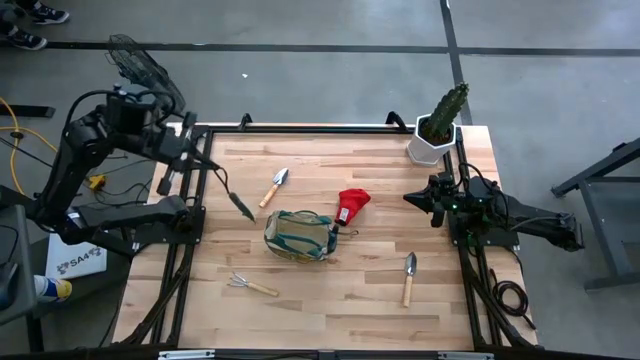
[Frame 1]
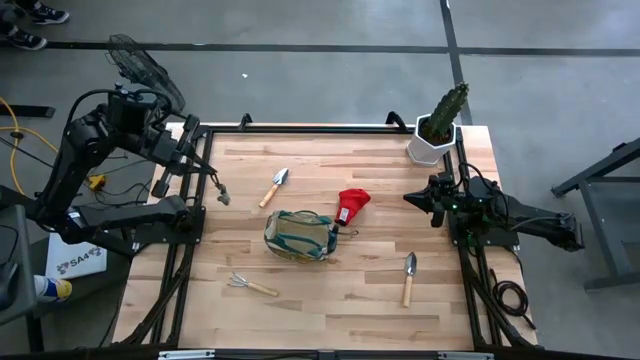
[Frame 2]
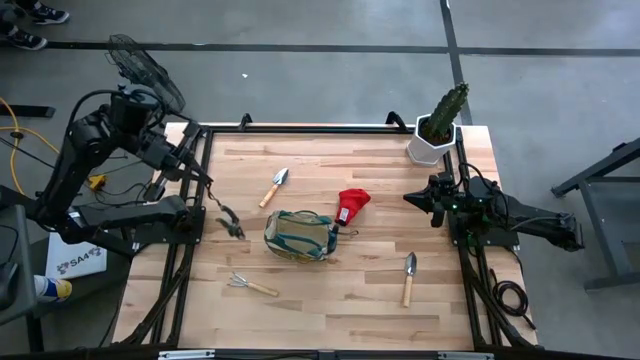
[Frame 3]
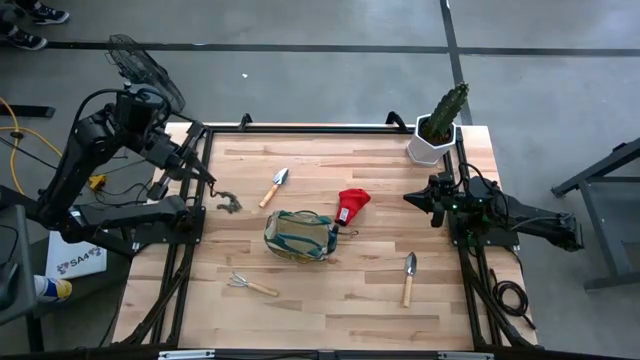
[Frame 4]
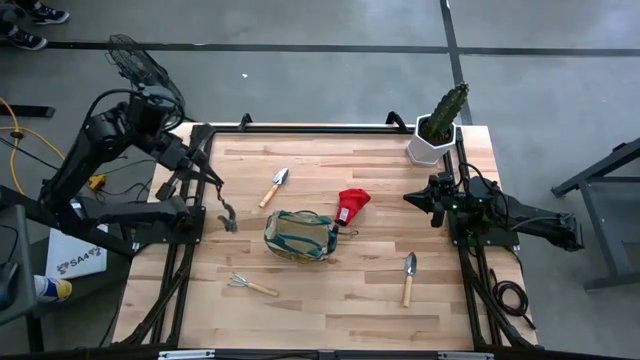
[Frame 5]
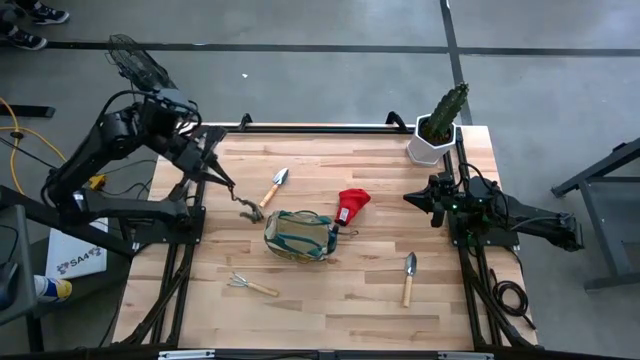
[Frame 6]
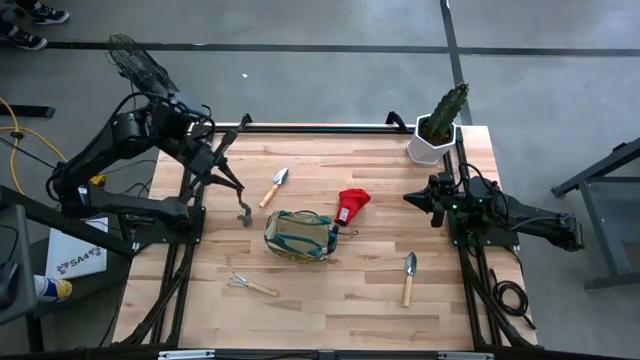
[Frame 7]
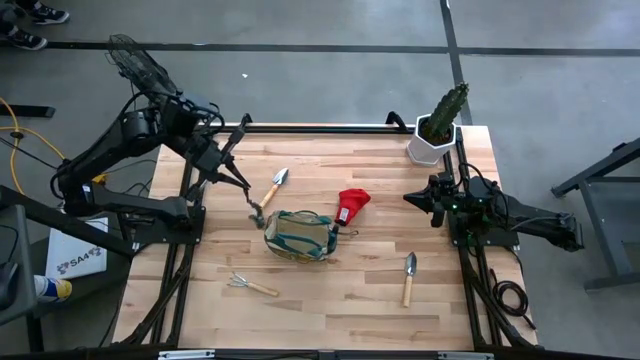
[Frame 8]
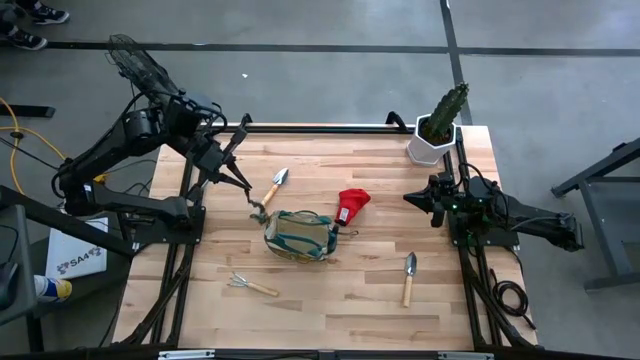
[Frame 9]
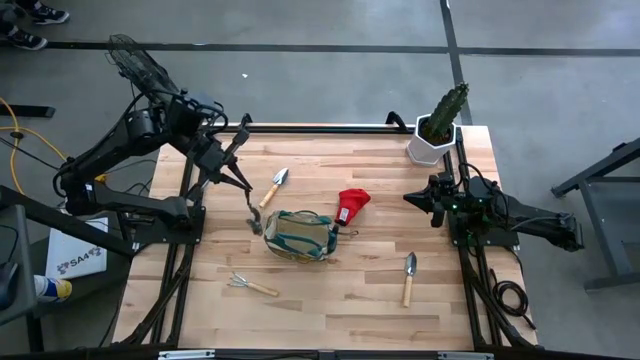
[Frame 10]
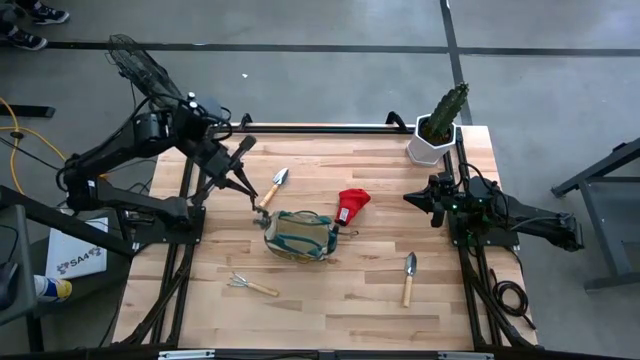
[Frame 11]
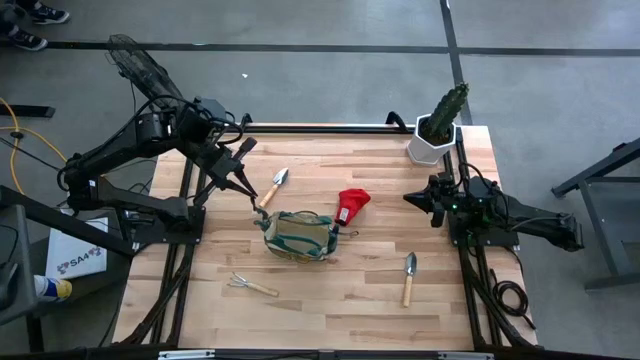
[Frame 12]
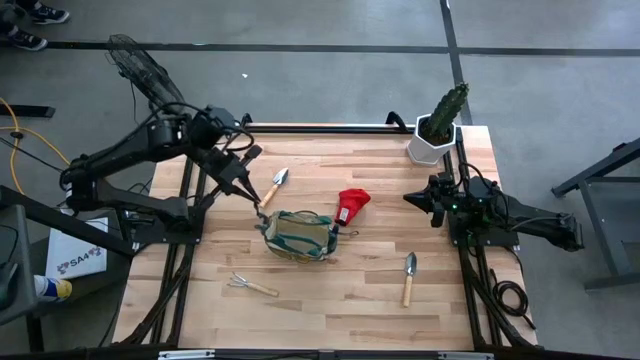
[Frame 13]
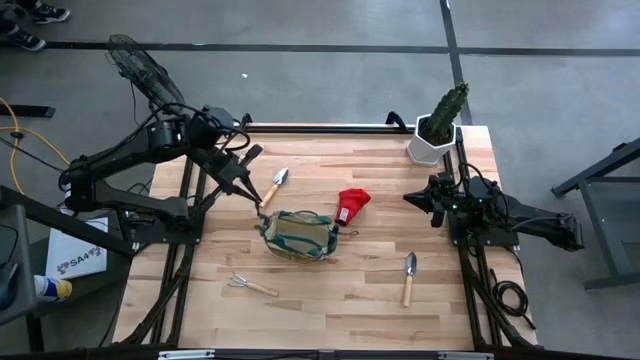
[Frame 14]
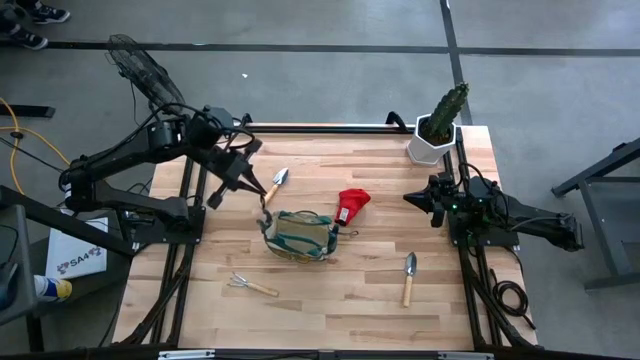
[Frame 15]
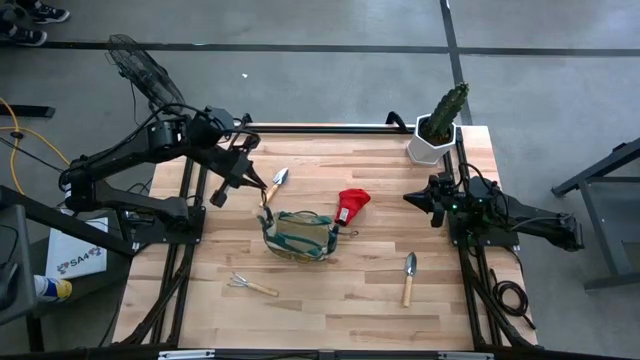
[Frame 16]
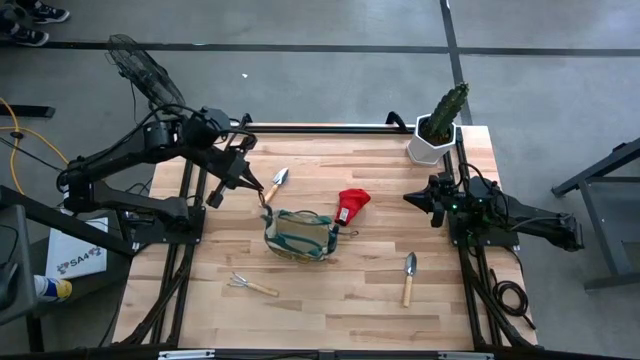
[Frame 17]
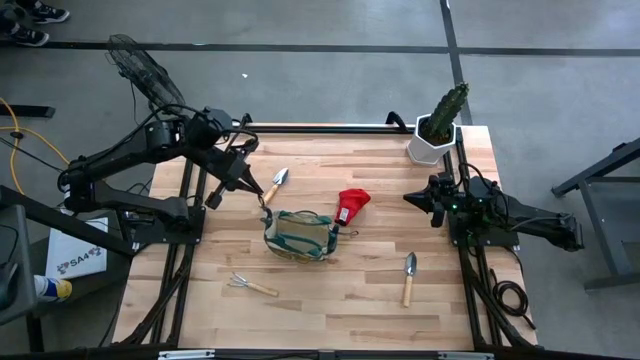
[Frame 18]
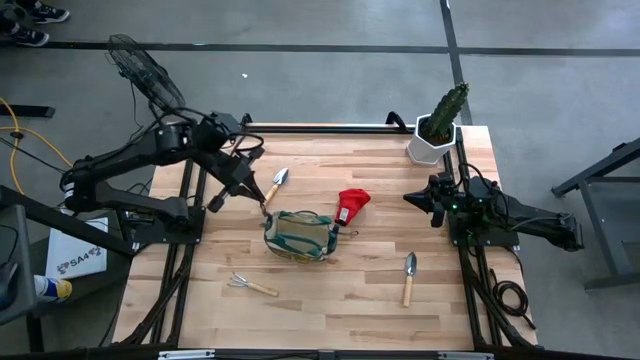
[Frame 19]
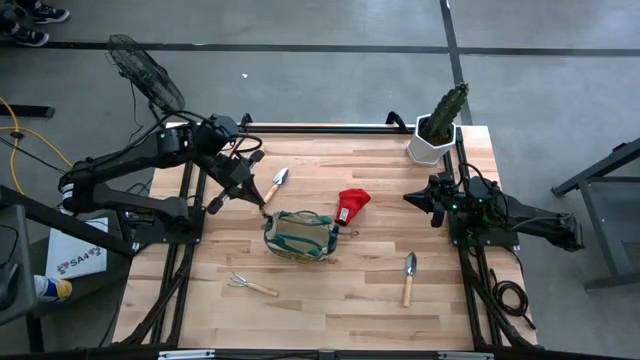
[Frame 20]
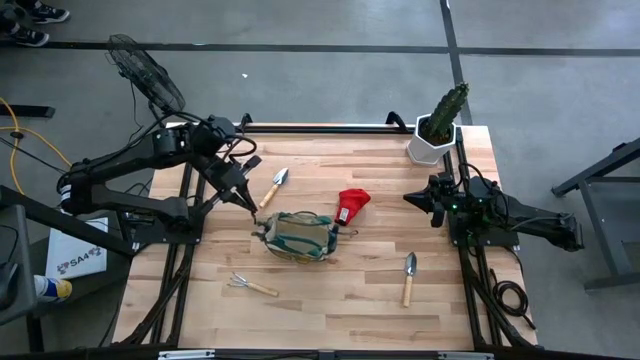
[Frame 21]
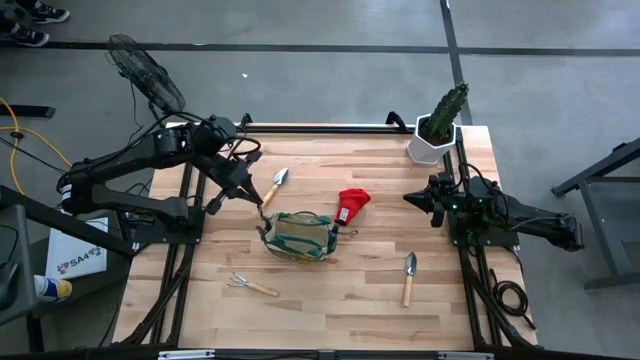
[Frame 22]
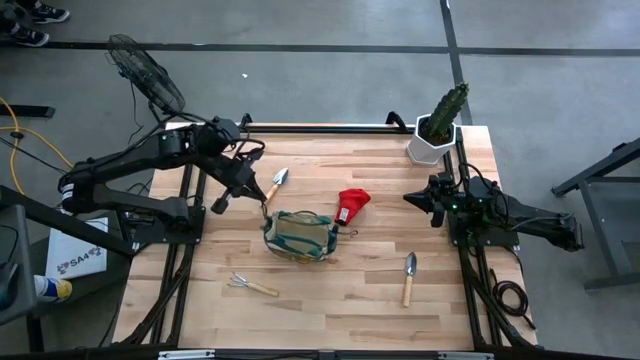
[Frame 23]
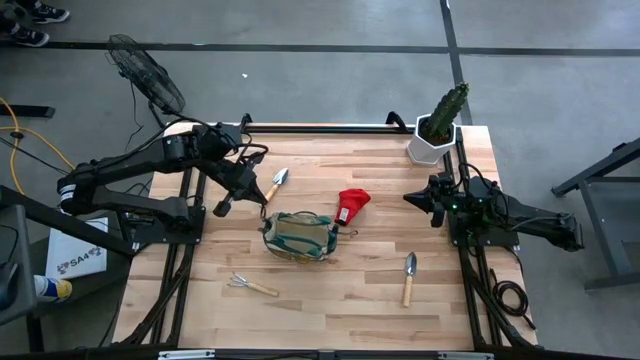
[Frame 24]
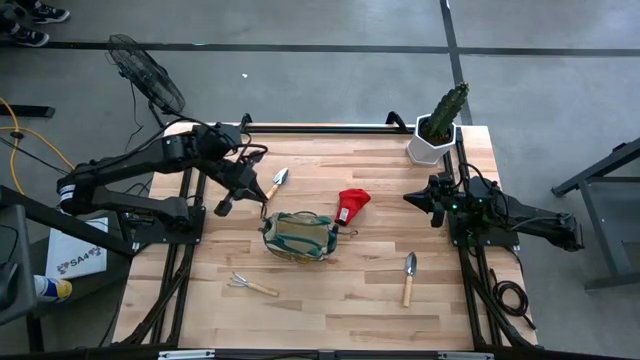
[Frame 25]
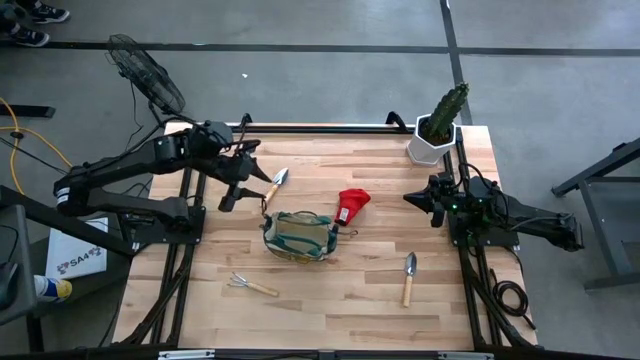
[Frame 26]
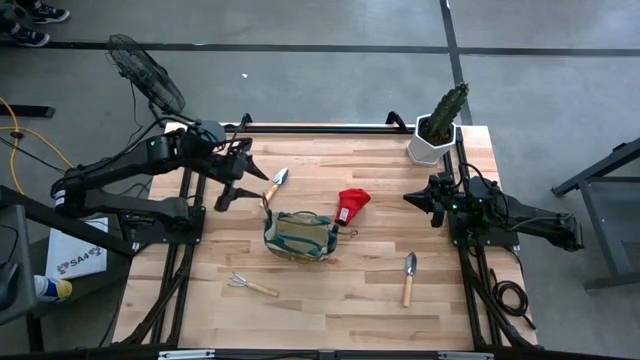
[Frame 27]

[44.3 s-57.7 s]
Task: Pick & Place Garden tools in Gardening bag
Put the shear green scissors into the gardening bag

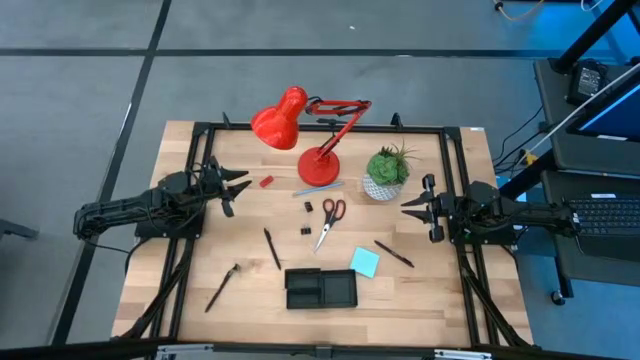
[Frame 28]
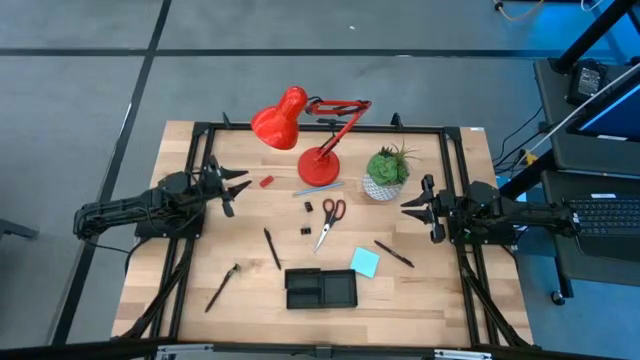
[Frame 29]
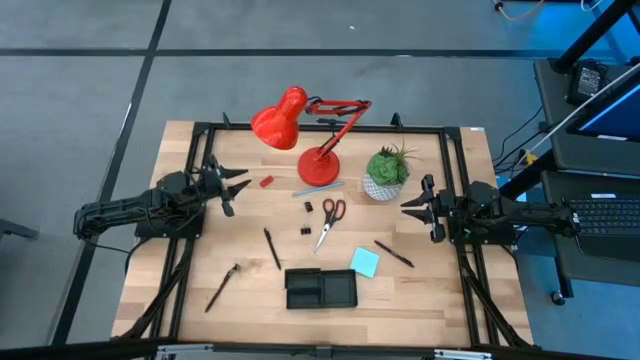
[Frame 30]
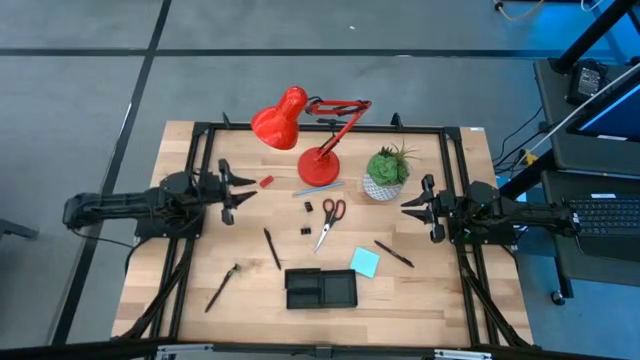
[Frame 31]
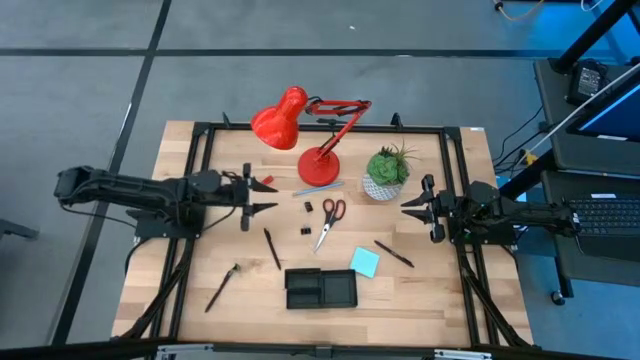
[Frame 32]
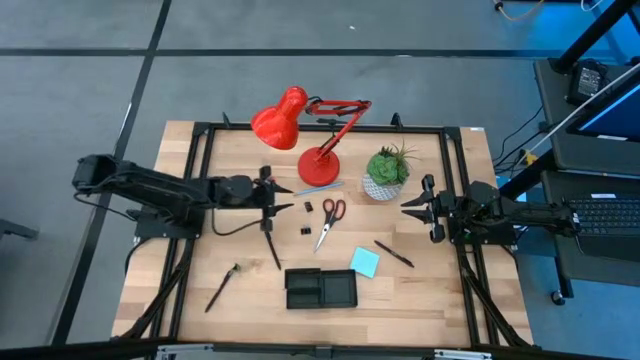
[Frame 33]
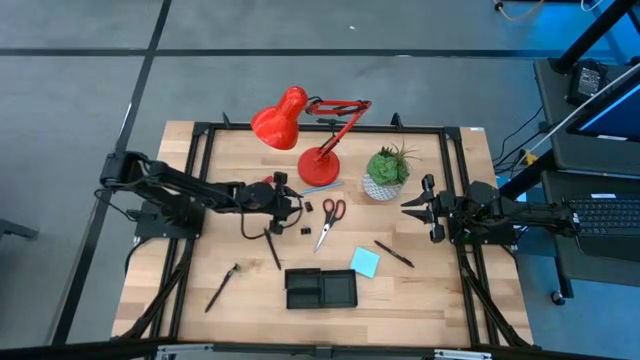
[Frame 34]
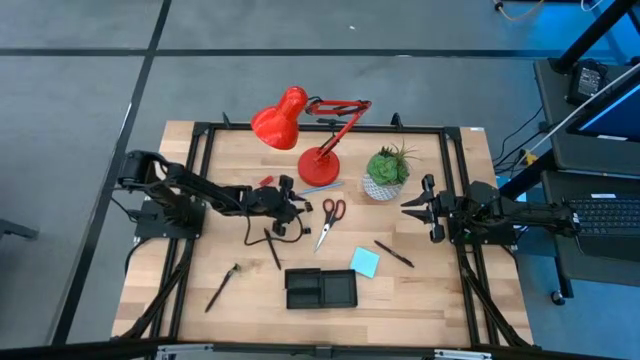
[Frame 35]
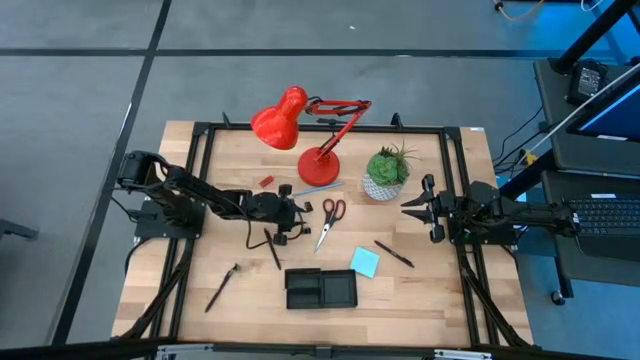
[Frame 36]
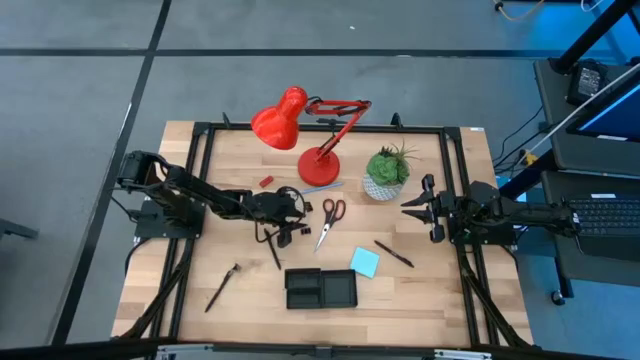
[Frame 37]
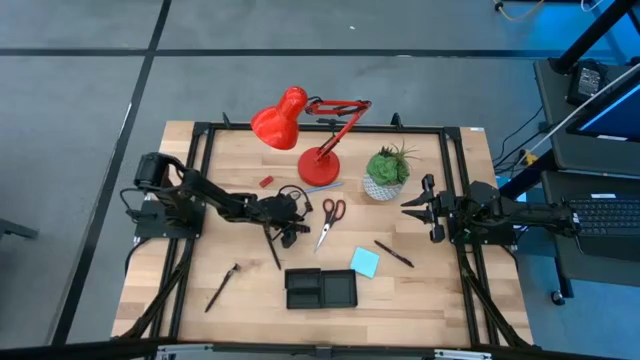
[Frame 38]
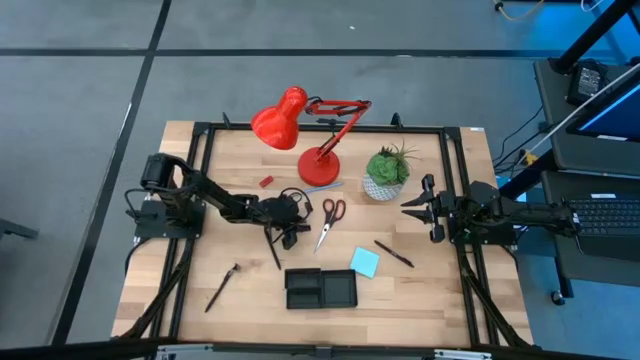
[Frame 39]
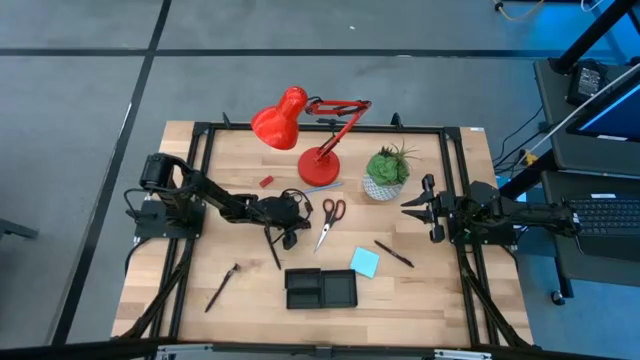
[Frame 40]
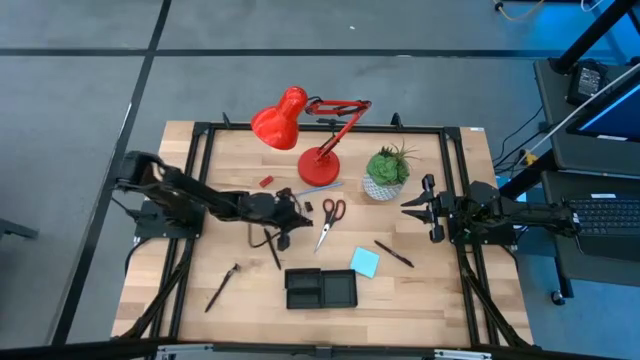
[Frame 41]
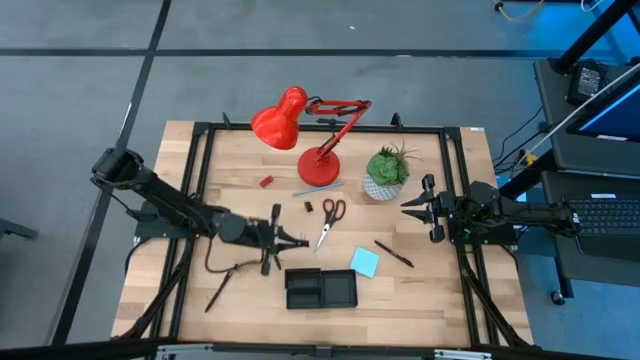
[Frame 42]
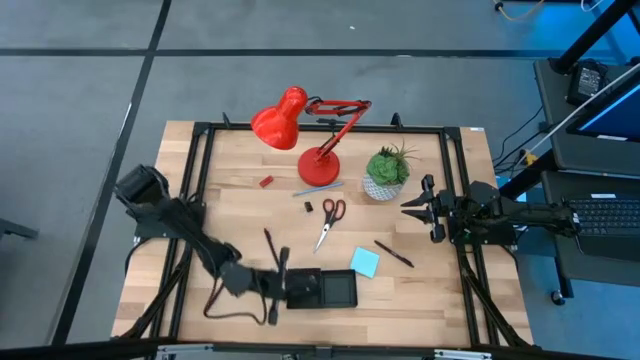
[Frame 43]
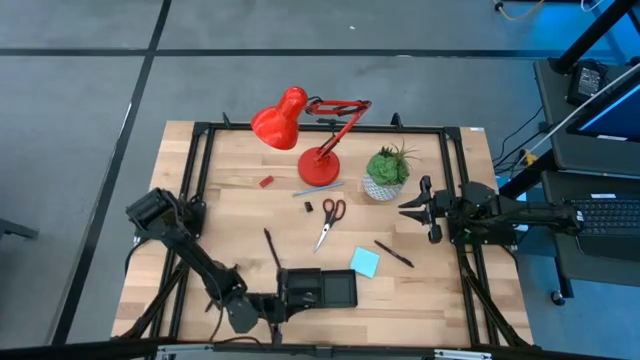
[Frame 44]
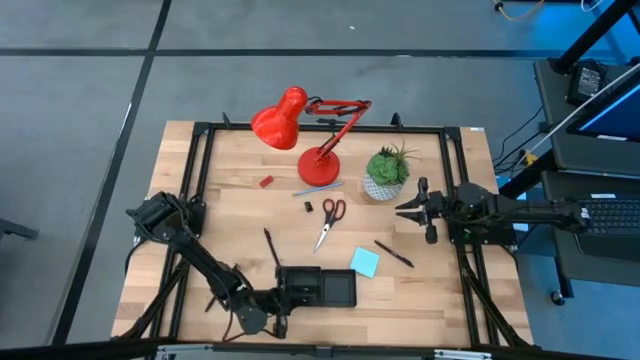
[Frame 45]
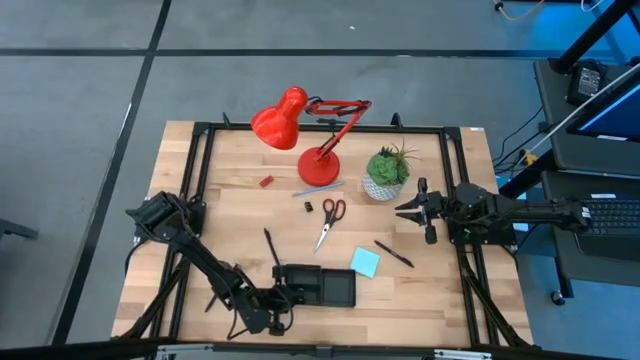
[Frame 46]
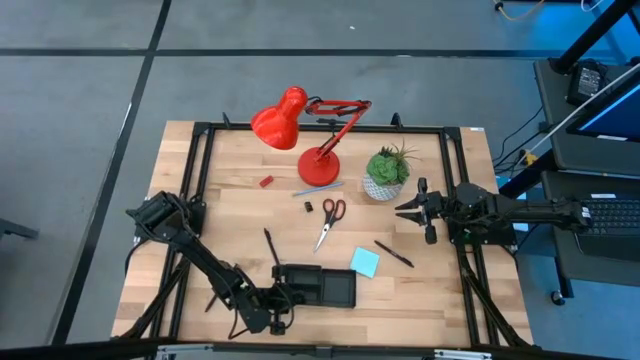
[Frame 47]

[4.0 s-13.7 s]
Task: Pick and place office supplies into organizer
Put the middle black binder clip into the black desk organizer
